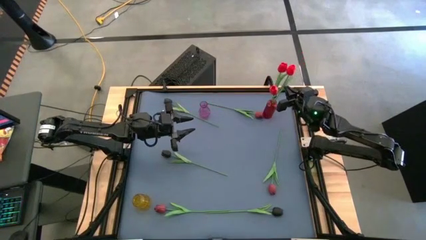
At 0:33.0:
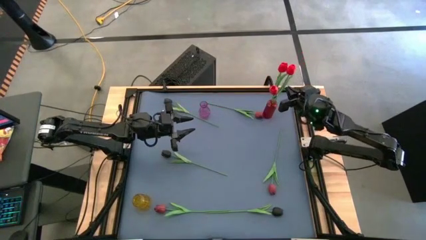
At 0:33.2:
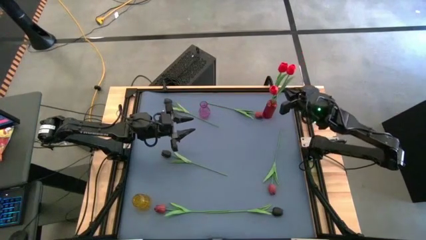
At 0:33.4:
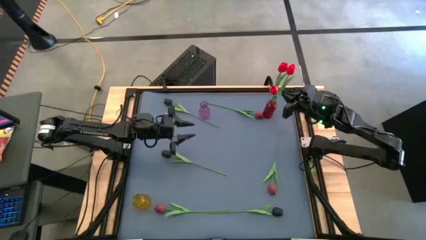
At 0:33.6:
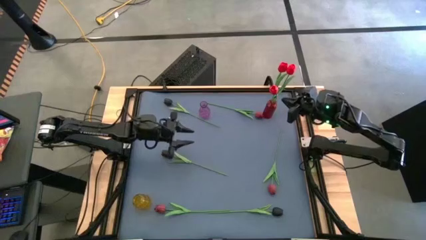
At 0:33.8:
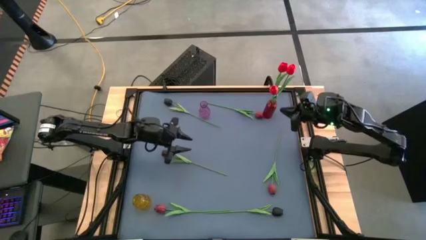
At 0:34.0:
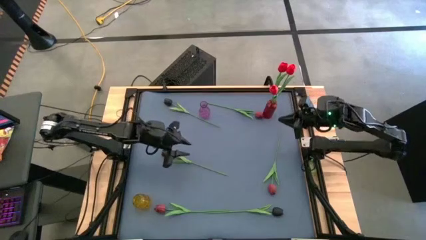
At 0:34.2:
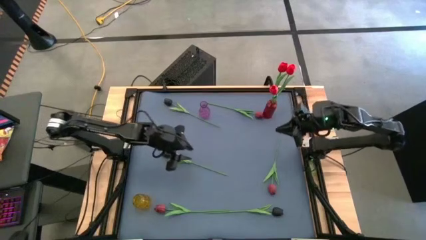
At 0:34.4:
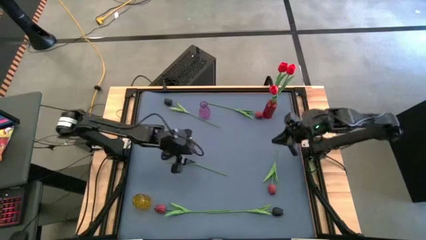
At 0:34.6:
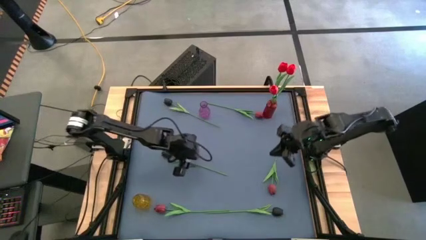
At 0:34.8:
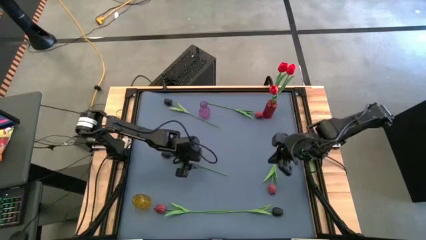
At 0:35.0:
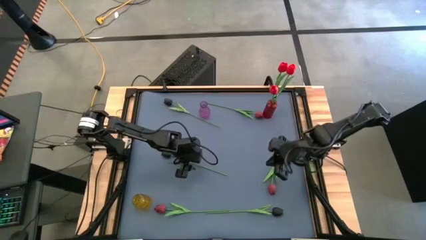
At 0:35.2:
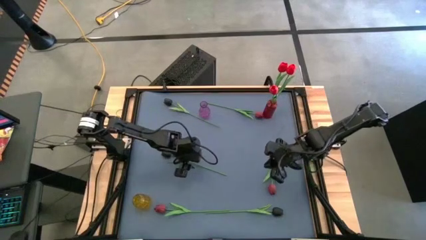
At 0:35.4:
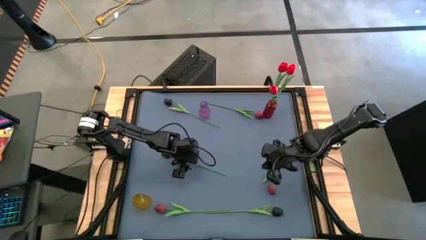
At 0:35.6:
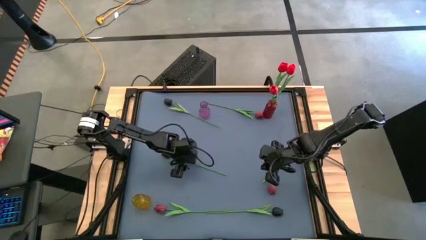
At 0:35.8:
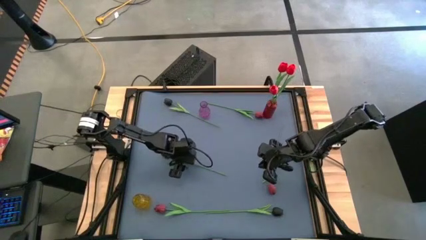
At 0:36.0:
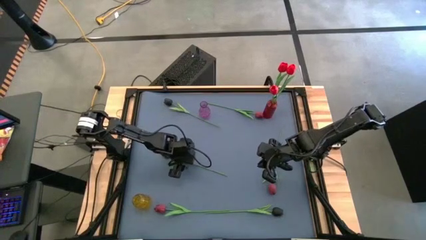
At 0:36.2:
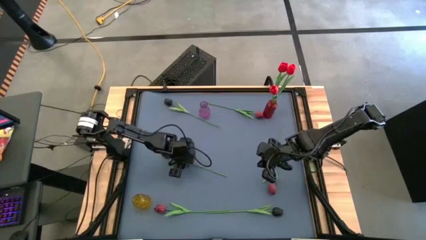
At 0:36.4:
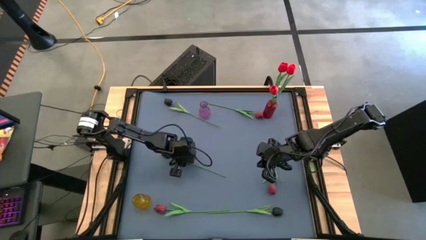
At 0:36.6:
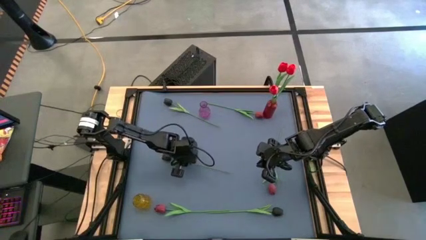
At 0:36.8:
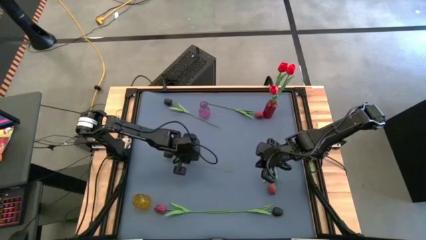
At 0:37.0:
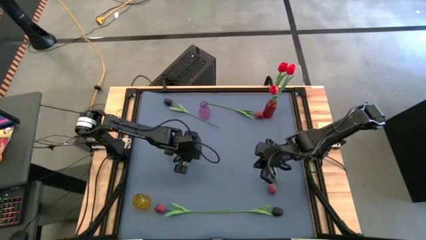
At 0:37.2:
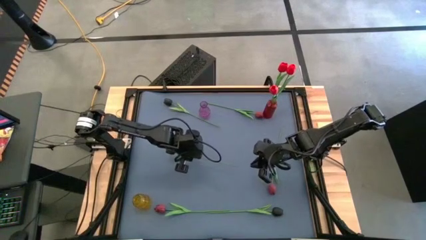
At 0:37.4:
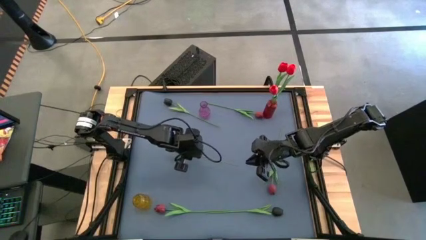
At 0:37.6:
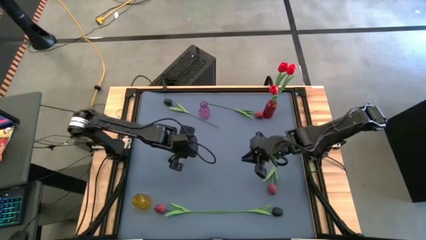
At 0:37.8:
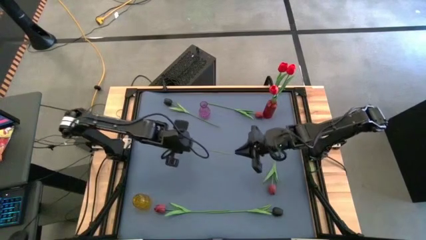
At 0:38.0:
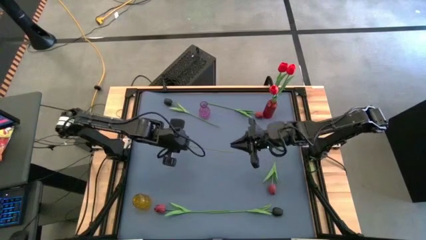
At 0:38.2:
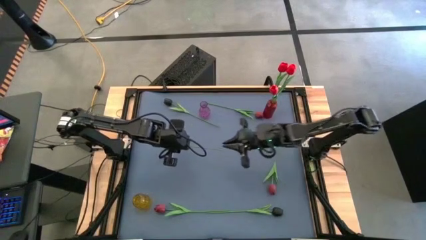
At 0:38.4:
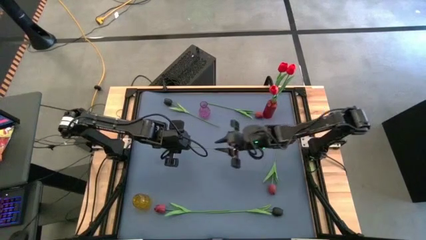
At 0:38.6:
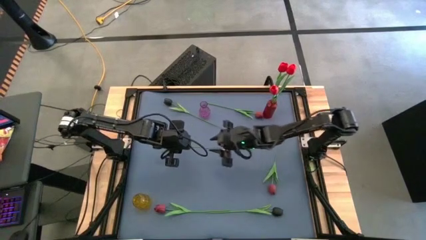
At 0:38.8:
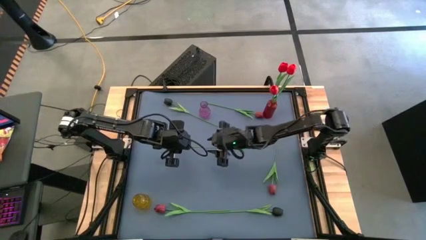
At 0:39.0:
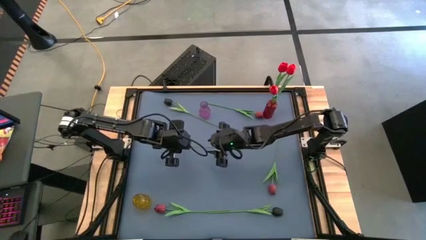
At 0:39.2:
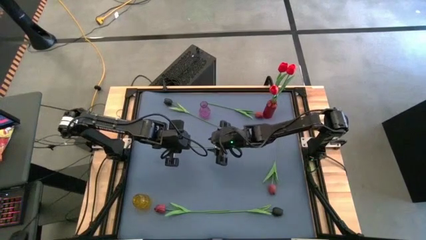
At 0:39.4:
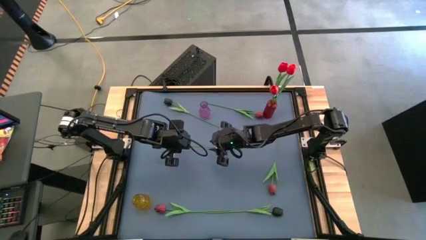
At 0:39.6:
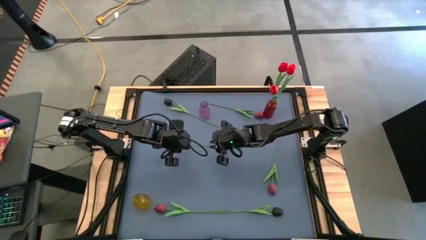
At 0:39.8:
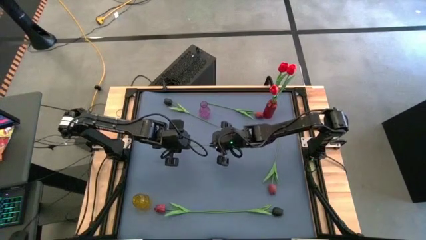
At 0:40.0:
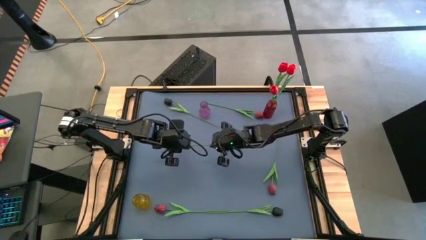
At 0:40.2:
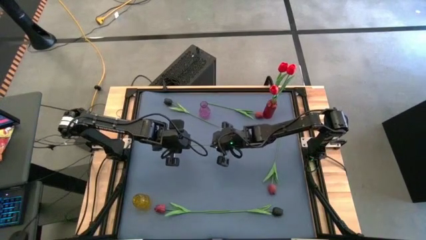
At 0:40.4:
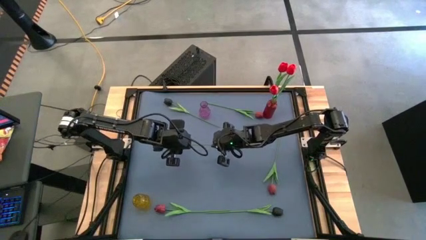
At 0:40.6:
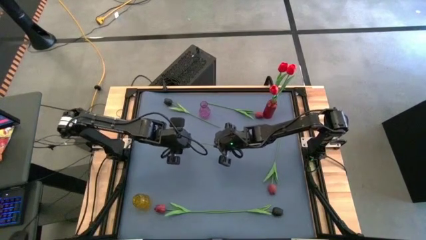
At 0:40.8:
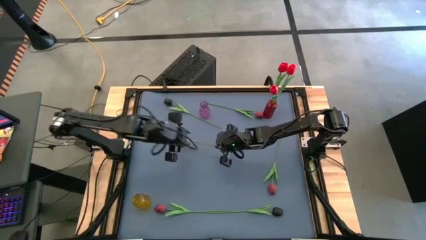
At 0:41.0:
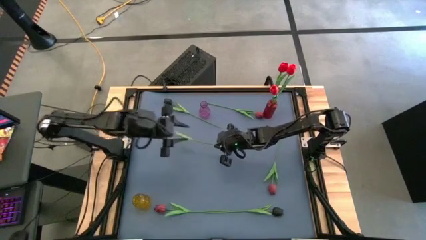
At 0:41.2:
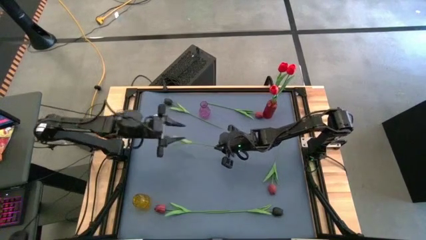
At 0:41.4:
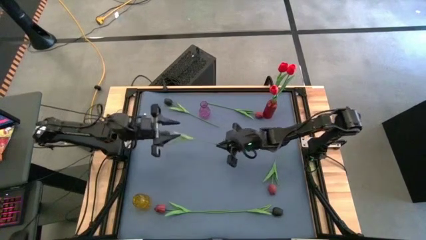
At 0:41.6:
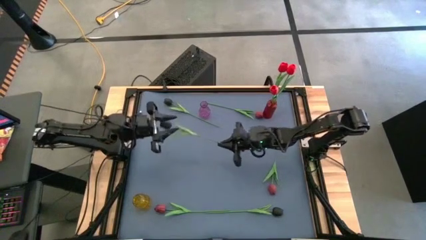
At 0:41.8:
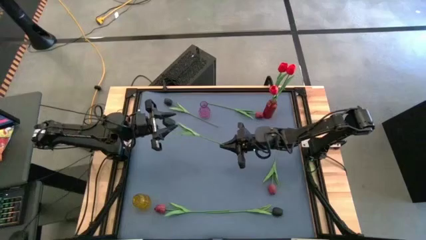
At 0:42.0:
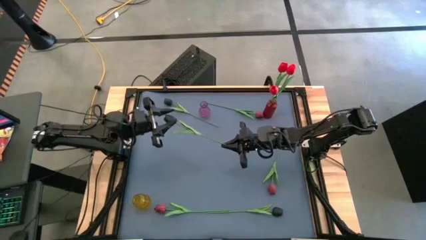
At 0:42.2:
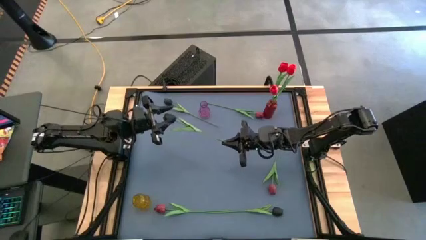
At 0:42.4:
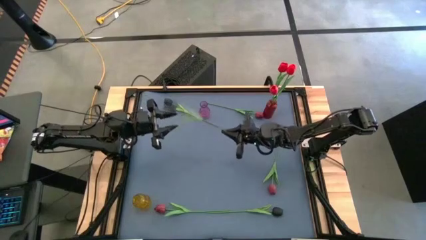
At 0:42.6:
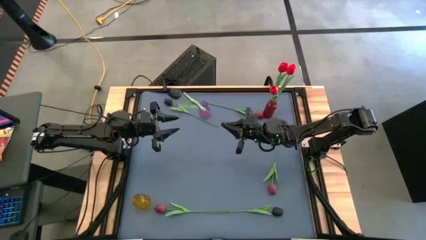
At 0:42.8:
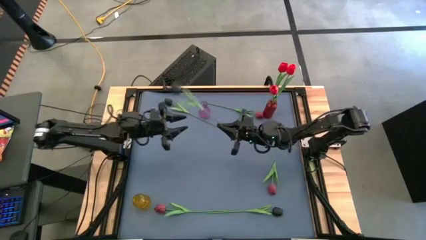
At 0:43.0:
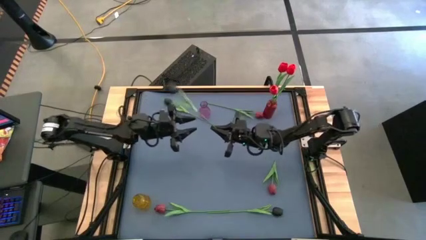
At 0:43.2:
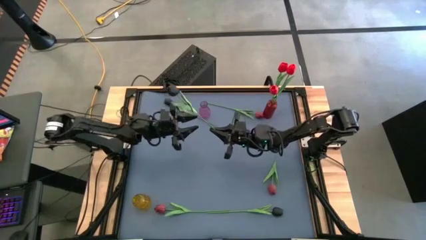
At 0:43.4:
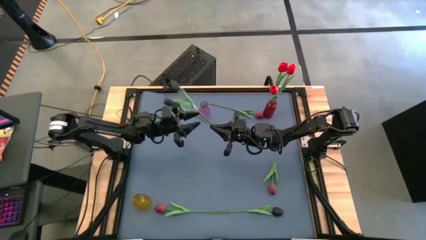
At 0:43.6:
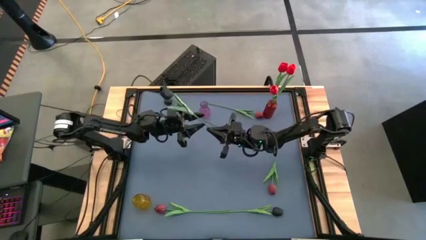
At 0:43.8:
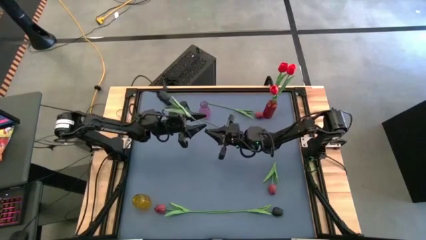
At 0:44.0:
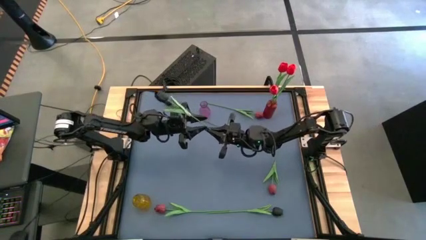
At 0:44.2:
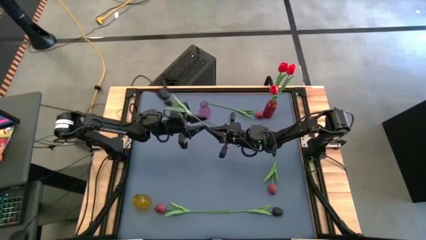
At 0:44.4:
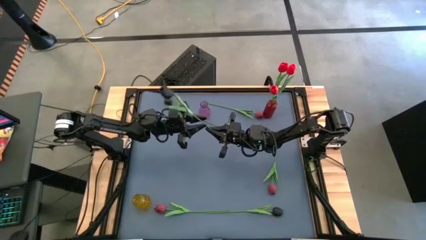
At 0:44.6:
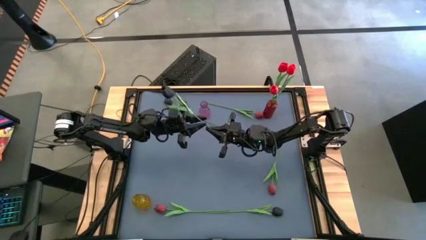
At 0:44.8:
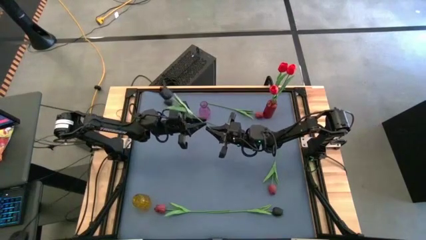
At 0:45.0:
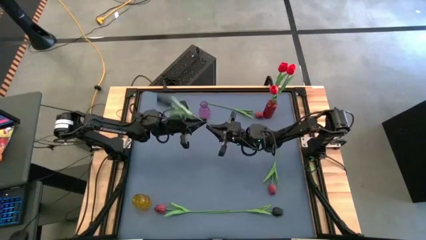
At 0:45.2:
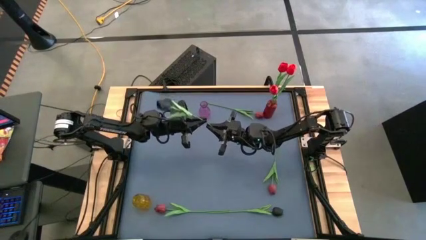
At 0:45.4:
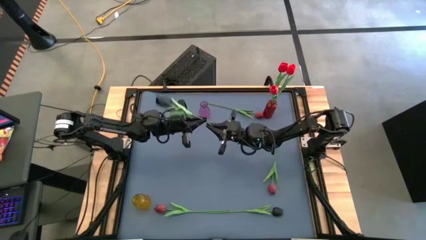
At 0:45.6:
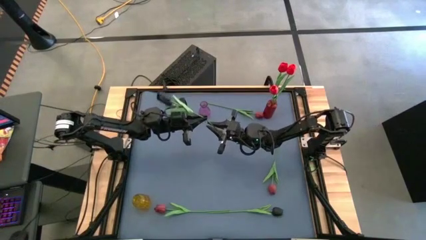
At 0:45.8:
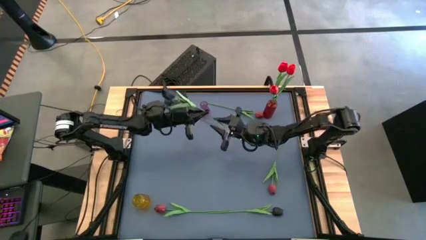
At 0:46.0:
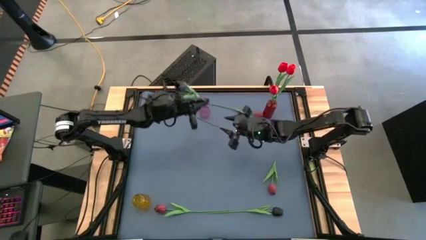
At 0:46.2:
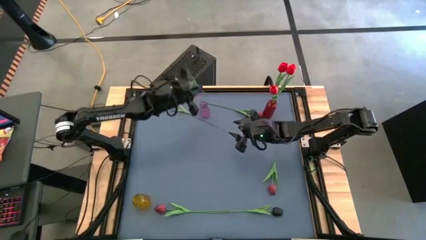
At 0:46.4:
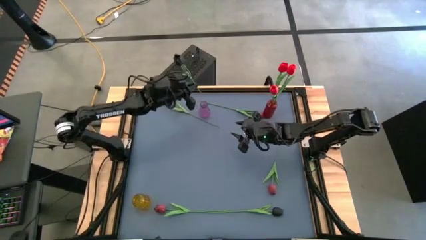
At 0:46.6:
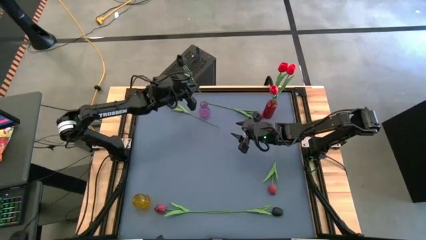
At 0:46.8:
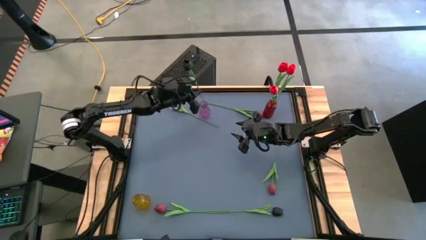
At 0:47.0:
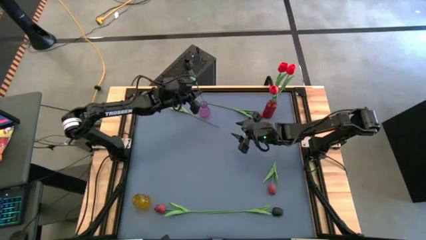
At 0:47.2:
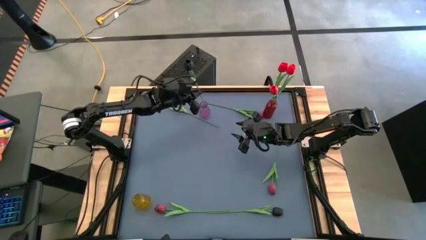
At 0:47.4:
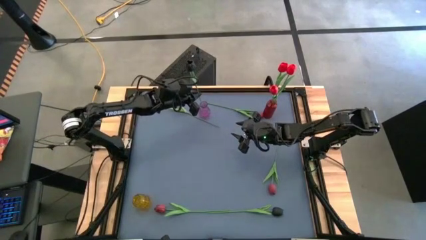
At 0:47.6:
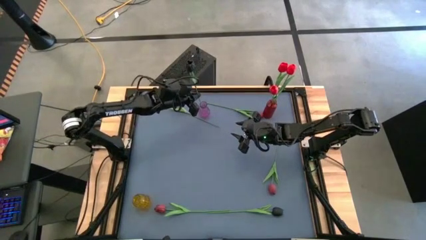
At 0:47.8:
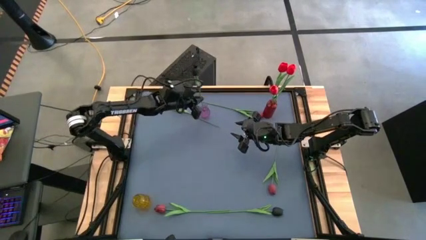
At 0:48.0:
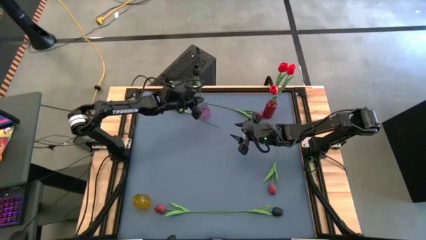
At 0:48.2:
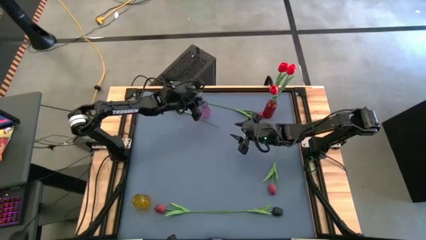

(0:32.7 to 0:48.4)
Task: Sort flowers into vase by color
Put the middle black flower into the violet vase
